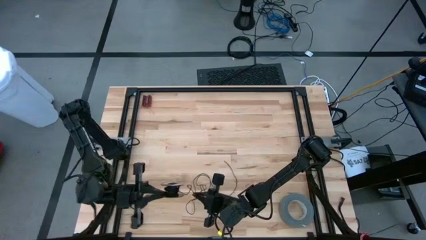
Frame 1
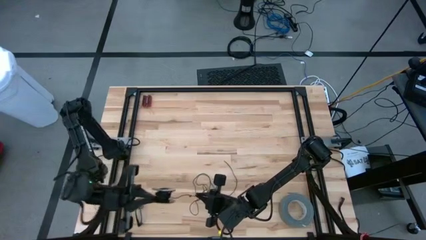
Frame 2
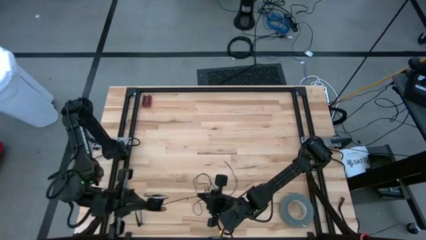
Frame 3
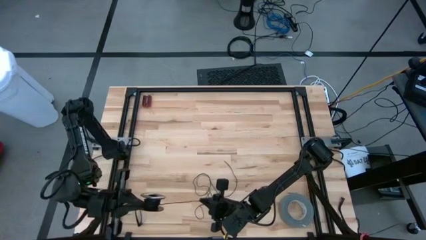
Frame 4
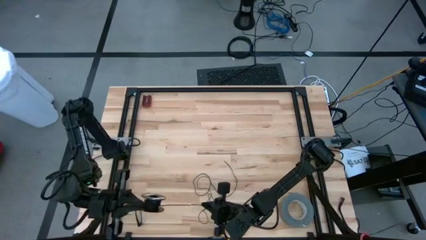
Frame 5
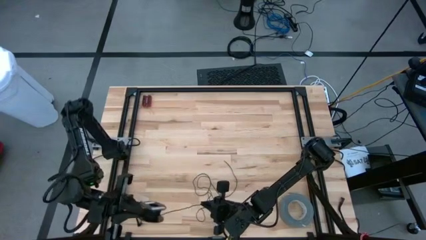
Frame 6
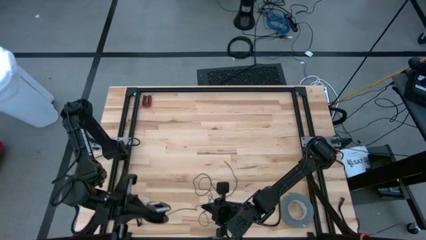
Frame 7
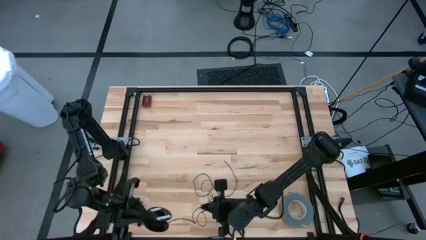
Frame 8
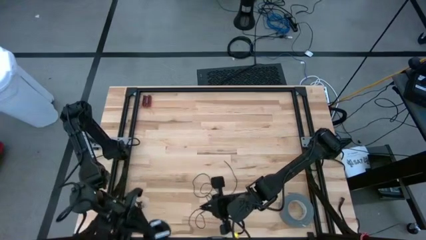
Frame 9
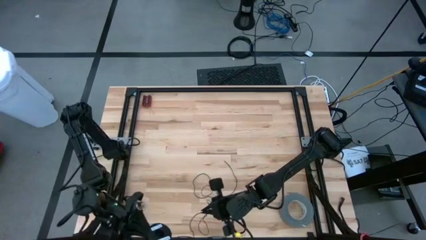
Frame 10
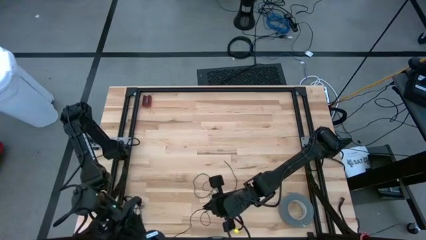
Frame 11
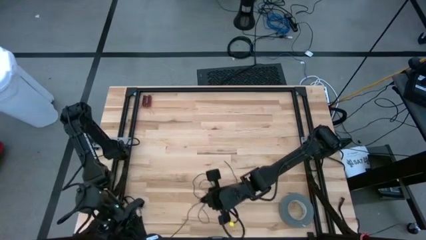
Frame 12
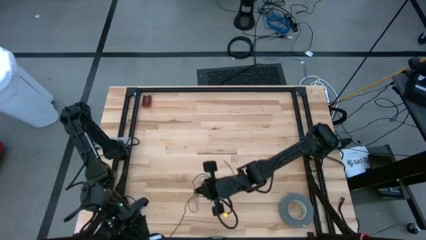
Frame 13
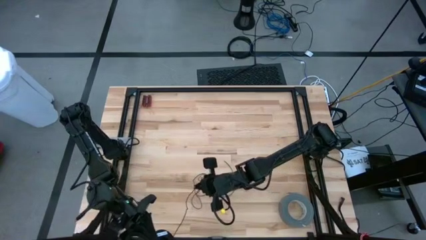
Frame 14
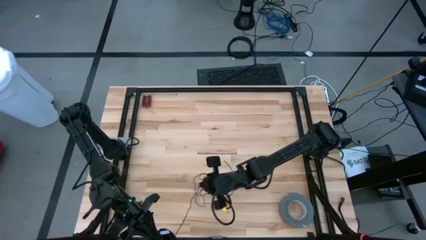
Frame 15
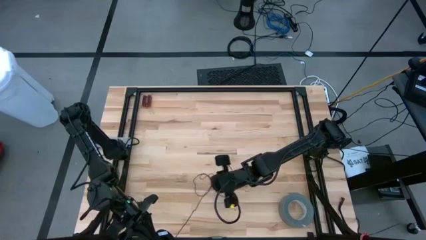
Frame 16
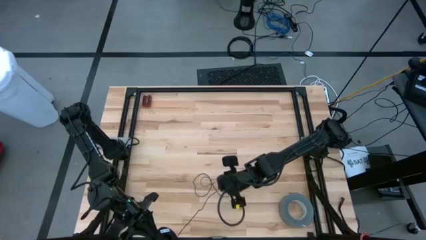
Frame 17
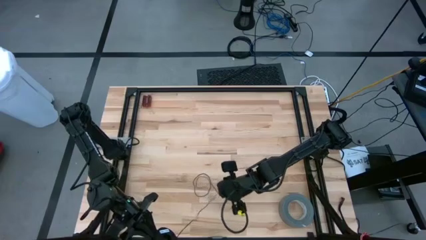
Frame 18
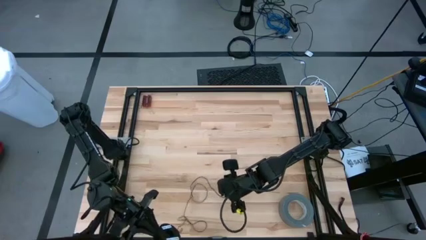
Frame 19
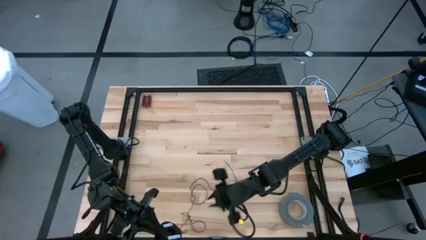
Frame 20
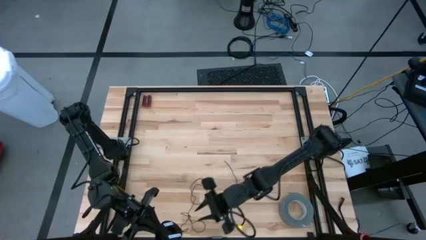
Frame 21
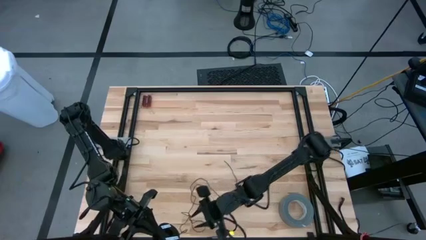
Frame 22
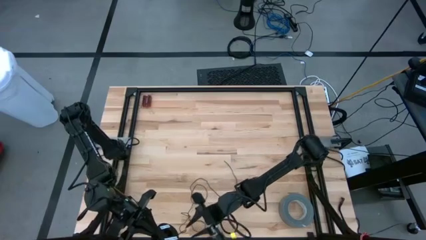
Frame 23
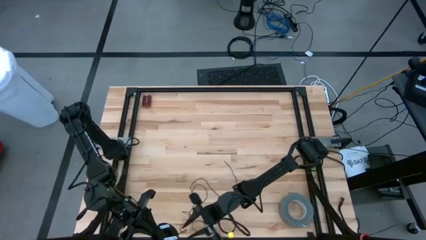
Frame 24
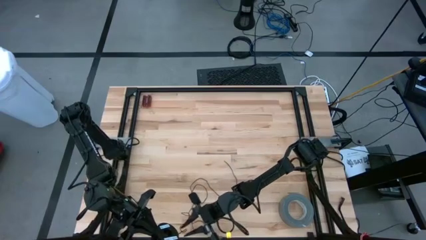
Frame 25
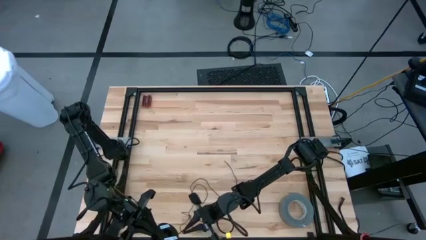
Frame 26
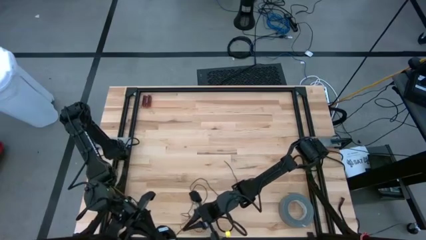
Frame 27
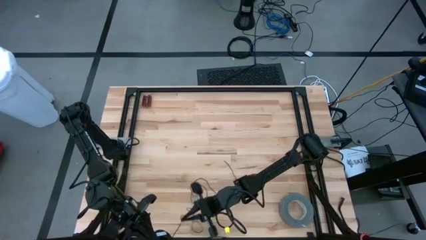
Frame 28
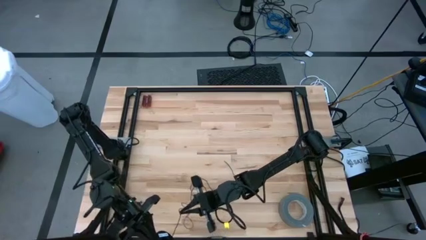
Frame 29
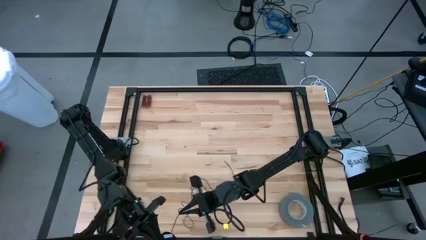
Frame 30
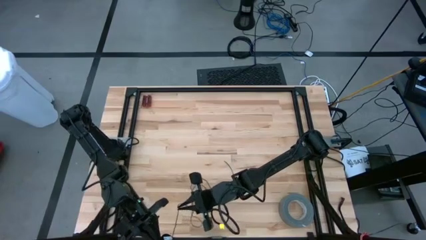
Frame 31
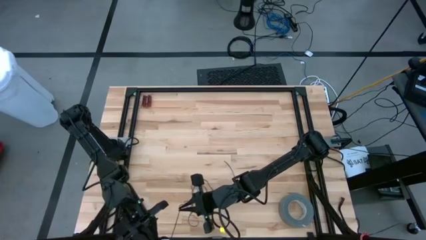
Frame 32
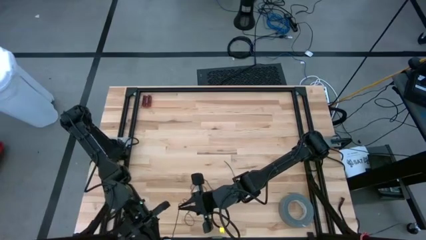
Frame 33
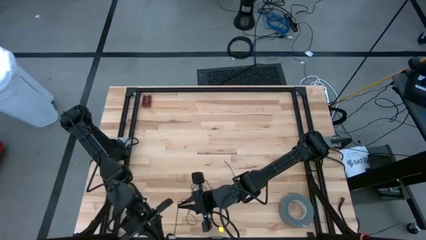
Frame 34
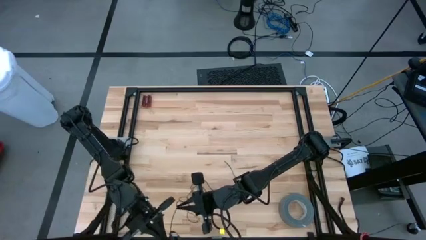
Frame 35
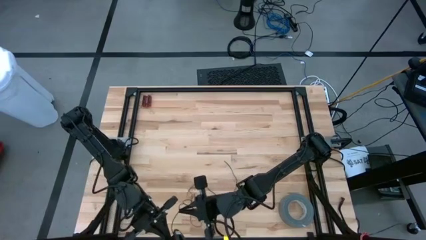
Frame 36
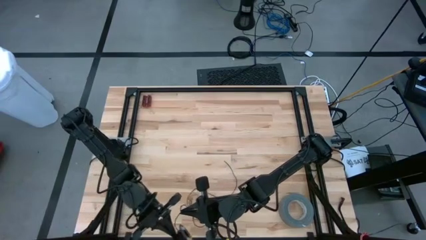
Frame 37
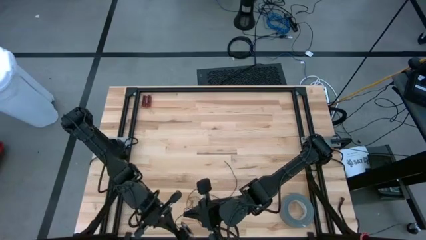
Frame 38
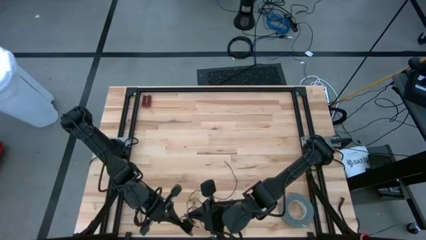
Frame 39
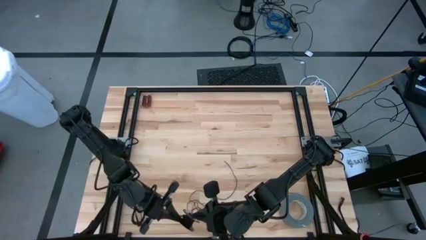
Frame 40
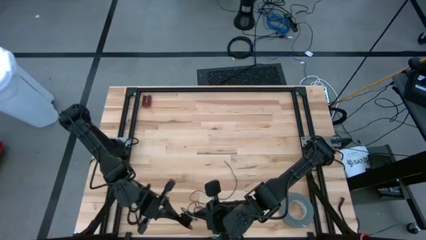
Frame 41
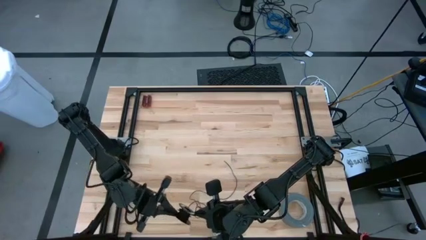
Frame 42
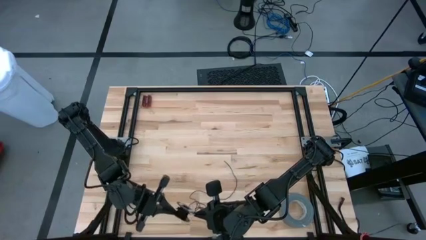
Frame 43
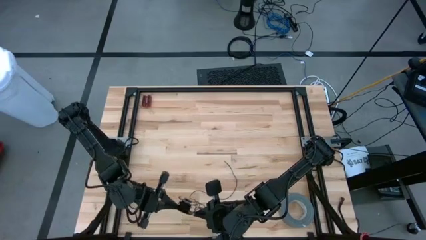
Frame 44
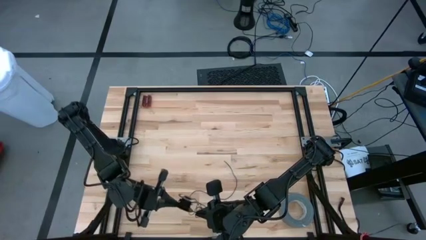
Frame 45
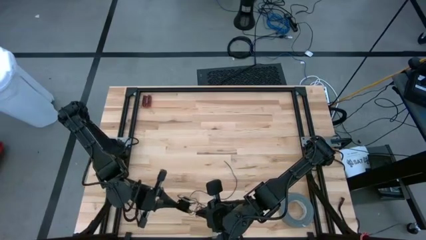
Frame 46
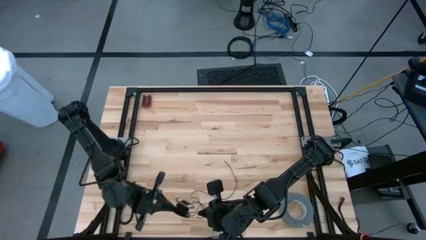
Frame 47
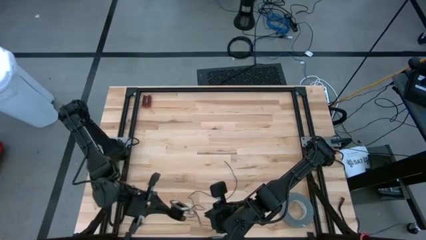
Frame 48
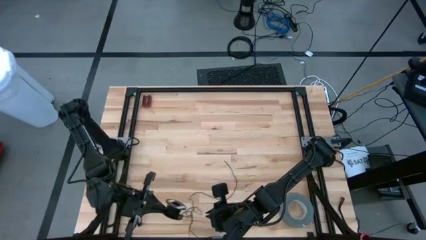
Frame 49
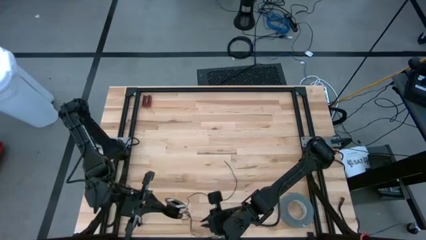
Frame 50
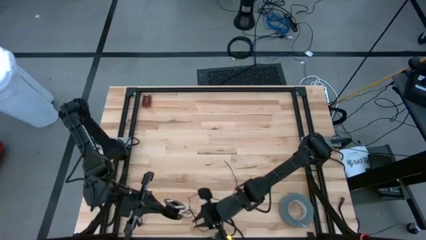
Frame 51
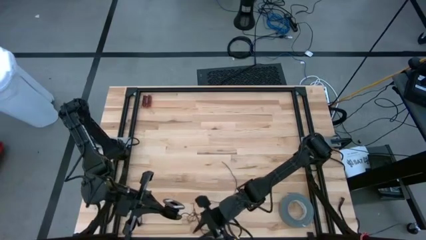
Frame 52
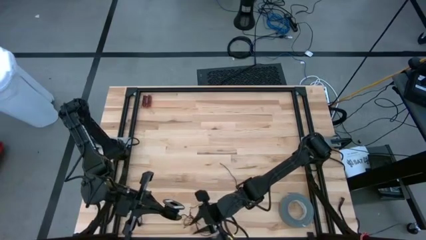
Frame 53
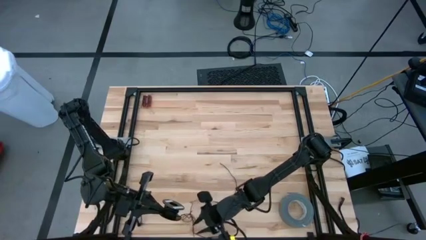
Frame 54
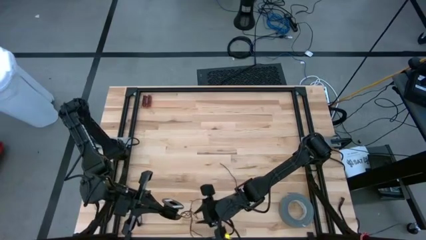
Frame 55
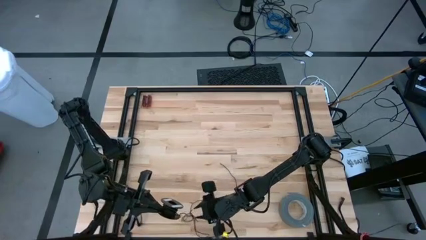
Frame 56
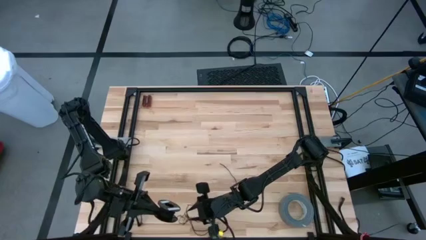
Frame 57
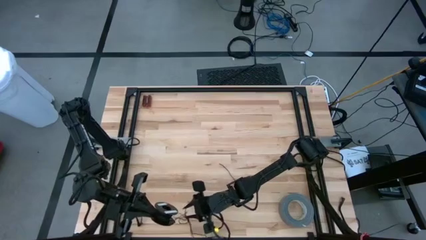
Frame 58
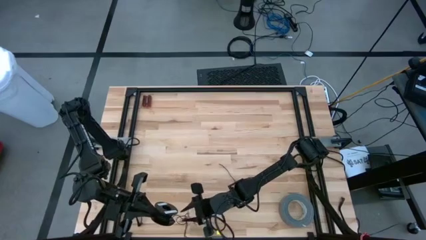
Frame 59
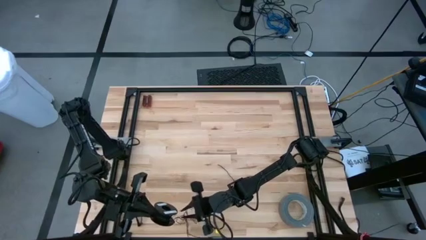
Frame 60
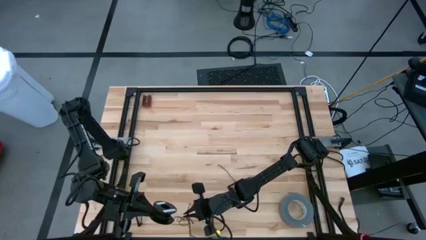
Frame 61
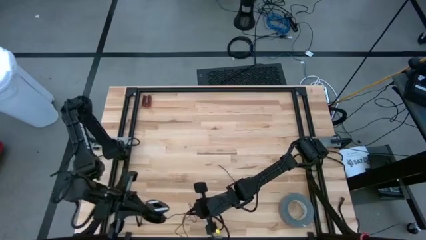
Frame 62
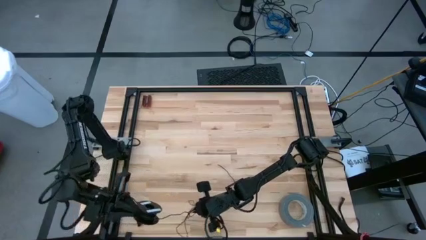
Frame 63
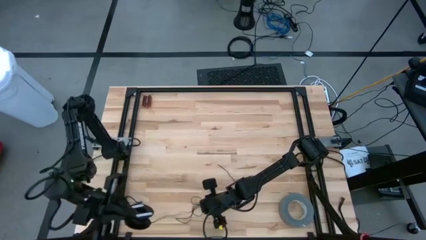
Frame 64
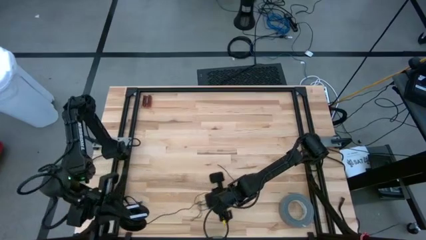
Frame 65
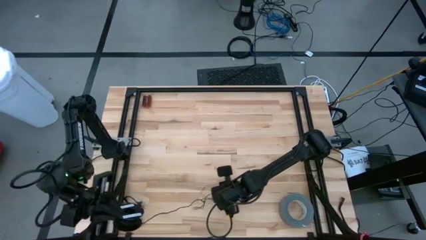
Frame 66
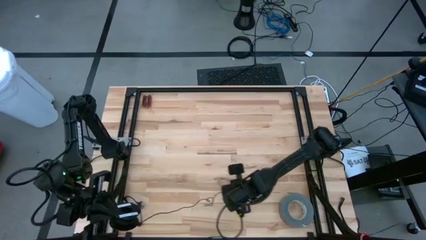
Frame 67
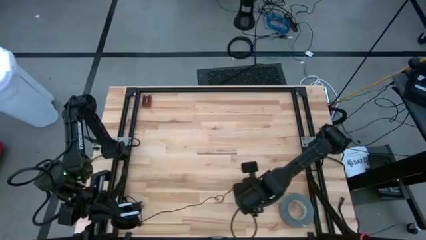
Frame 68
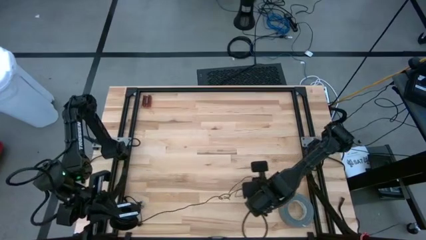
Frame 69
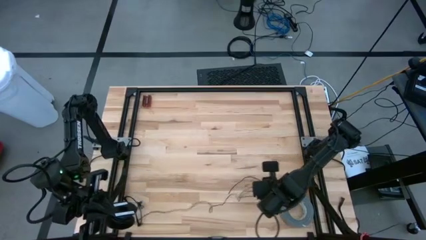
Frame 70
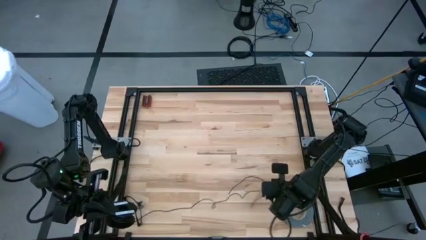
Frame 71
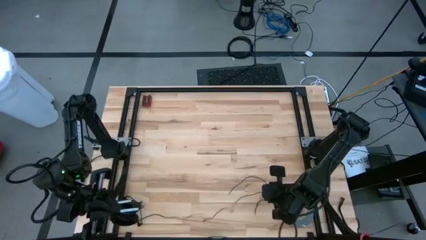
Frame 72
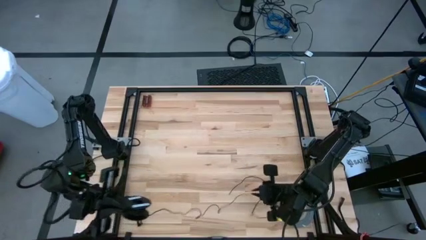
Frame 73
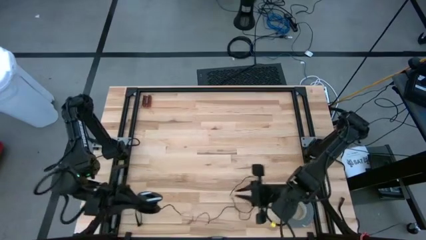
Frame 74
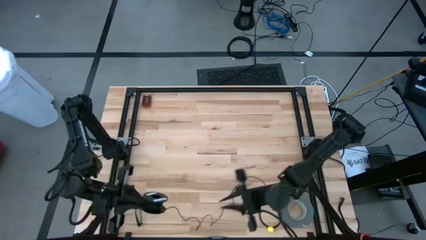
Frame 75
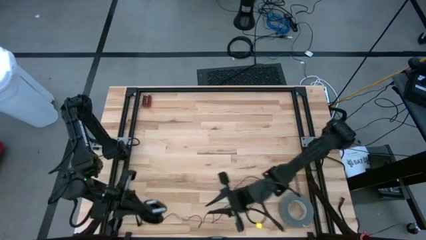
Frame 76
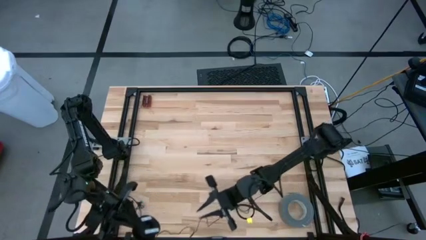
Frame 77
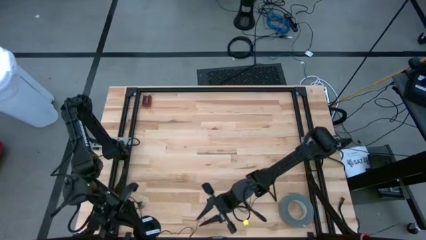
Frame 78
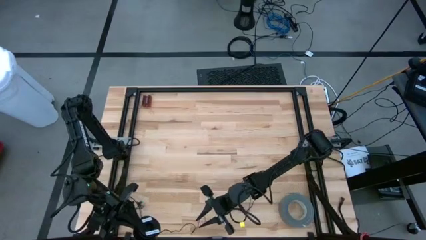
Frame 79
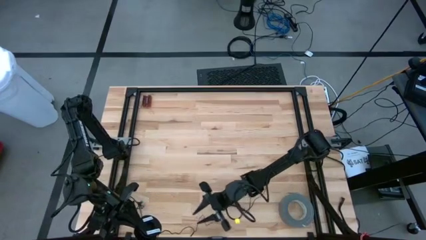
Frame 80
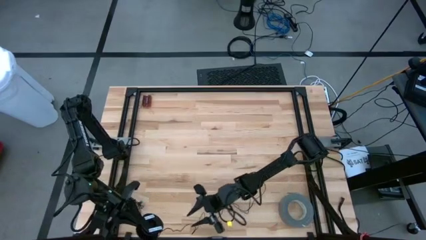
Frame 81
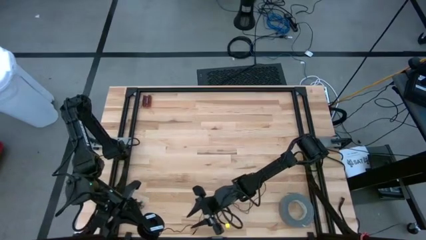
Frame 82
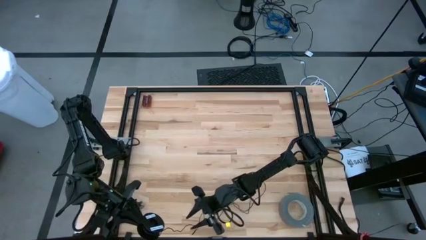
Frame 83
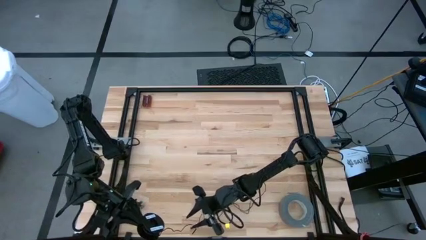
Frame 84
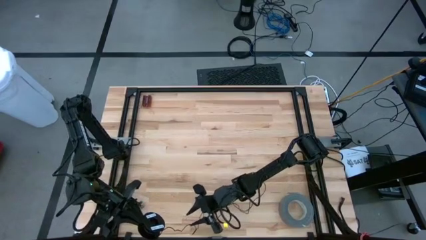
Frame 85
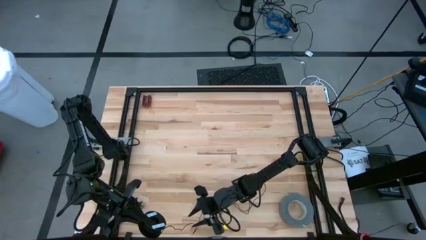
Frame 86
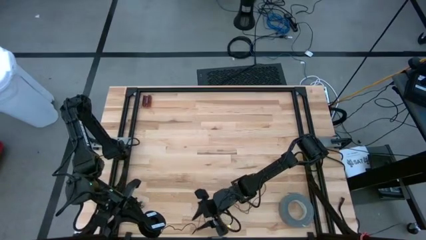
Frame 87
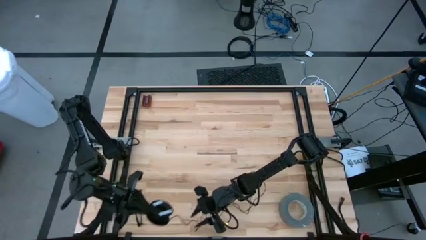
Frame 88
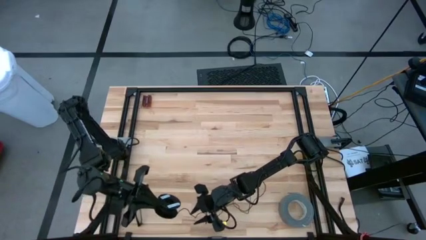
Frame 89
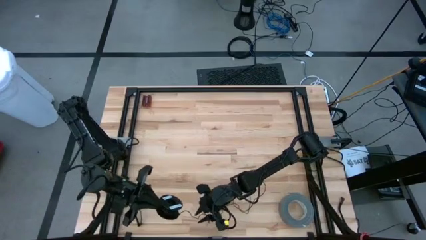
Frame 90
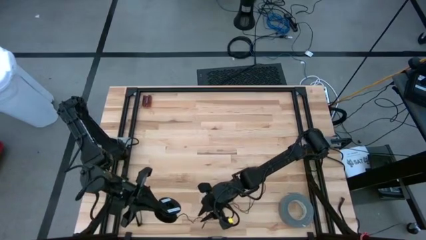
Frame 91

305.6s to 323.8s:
Task: Coil cords
Coil the black wire on the spool
